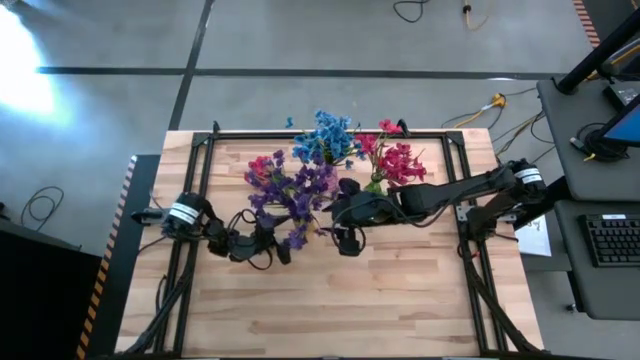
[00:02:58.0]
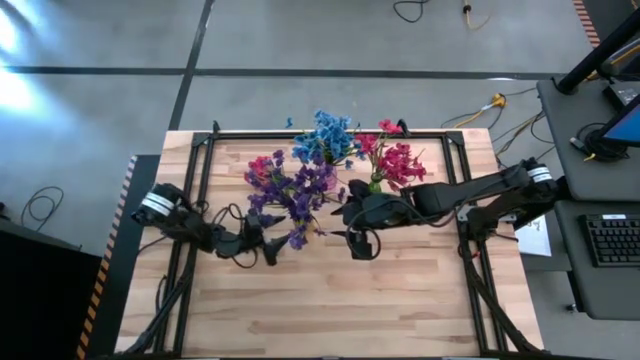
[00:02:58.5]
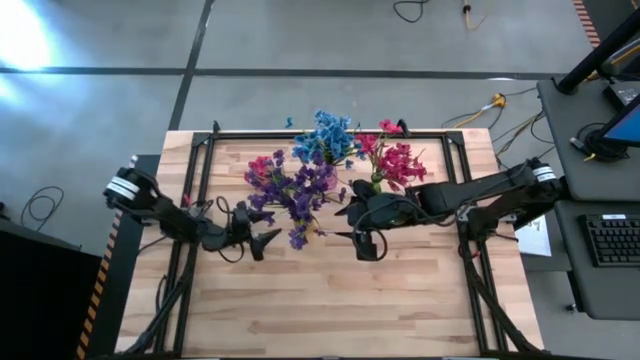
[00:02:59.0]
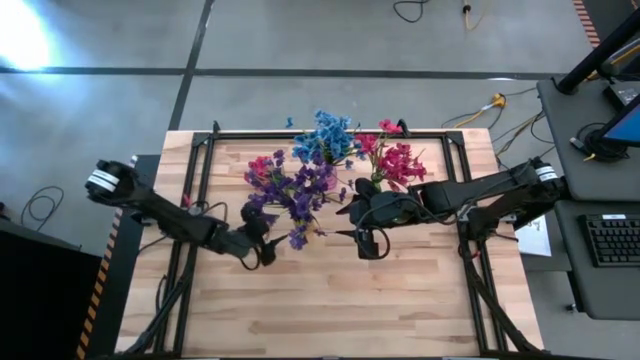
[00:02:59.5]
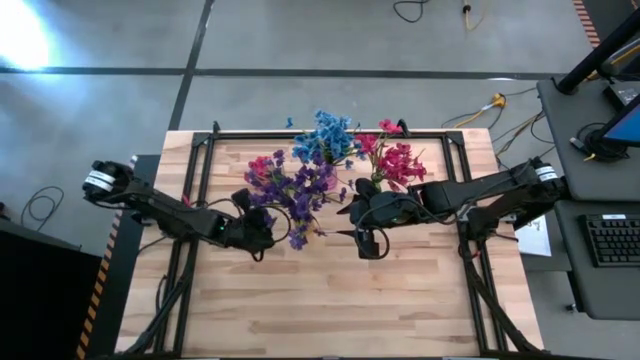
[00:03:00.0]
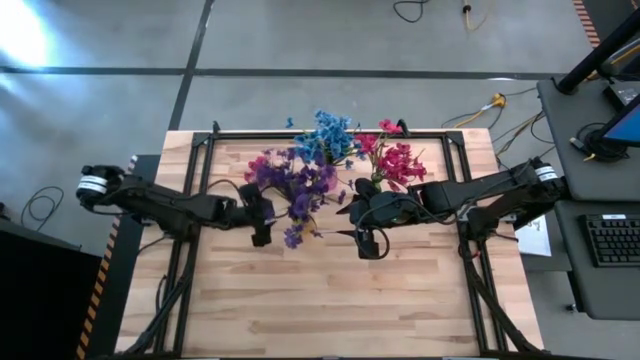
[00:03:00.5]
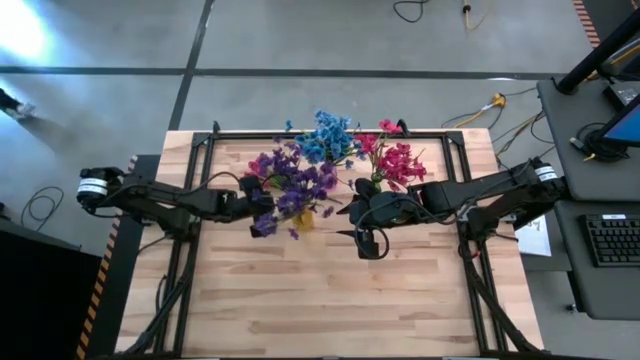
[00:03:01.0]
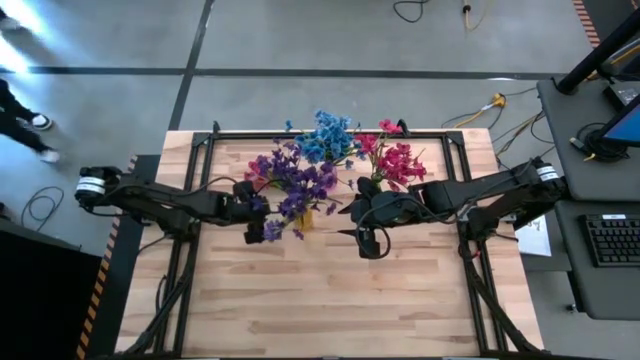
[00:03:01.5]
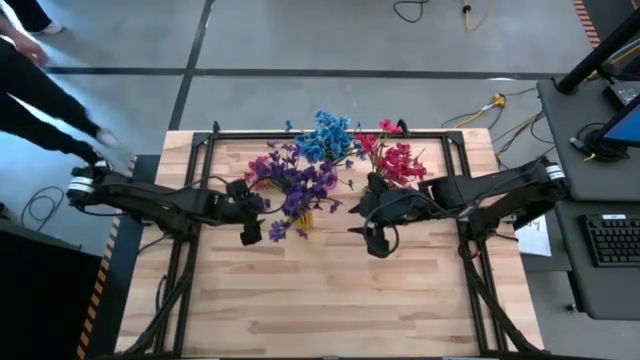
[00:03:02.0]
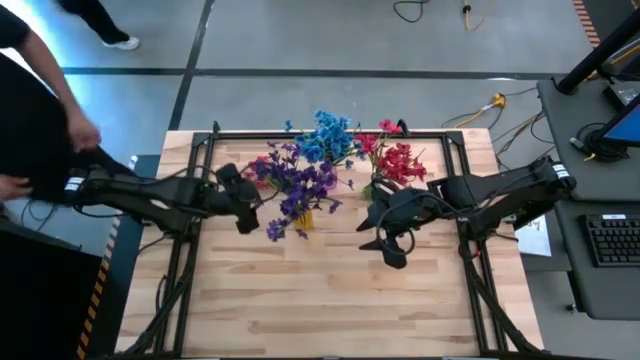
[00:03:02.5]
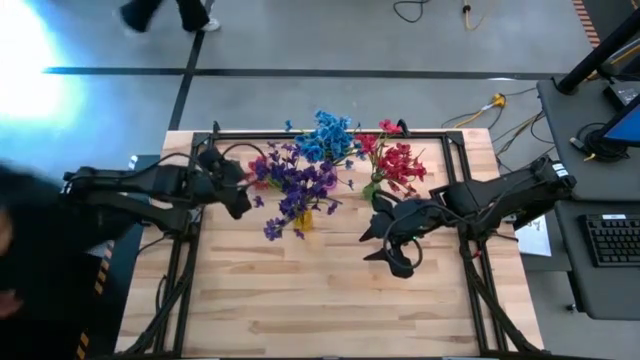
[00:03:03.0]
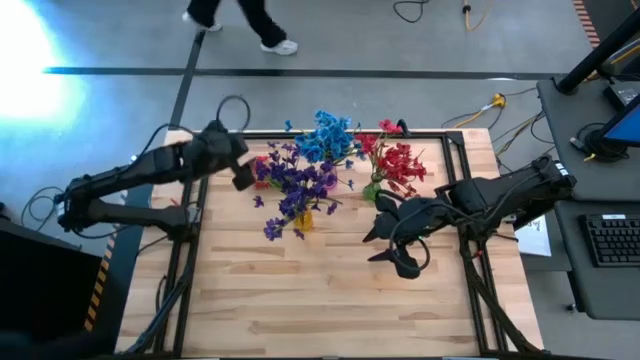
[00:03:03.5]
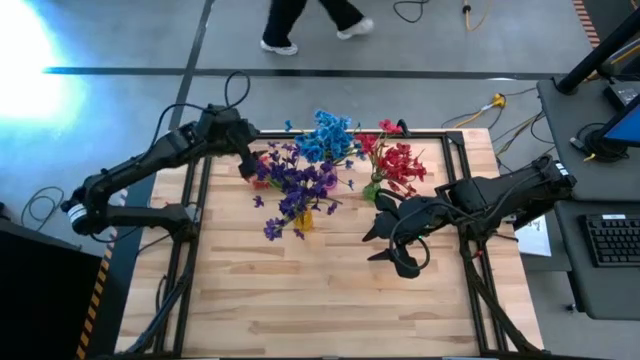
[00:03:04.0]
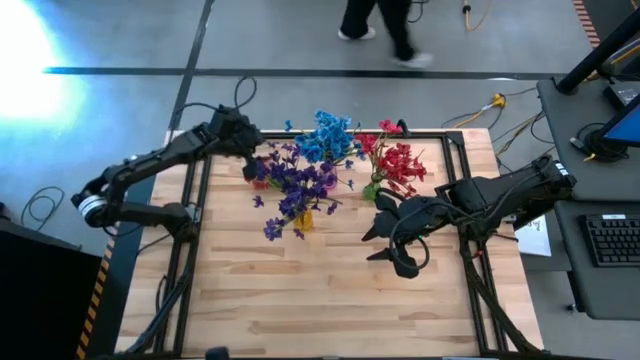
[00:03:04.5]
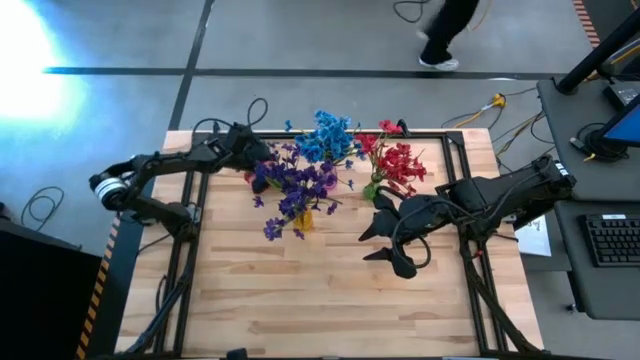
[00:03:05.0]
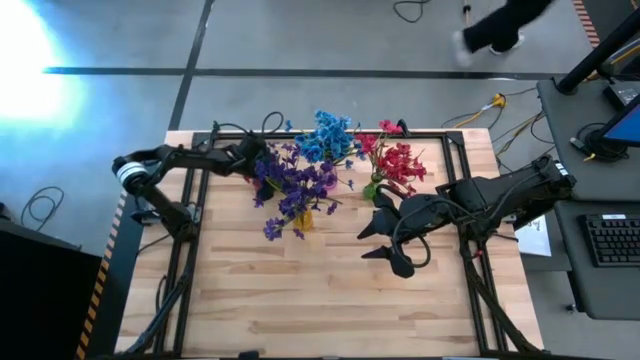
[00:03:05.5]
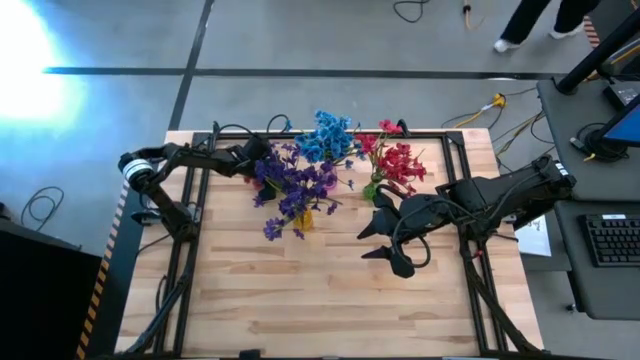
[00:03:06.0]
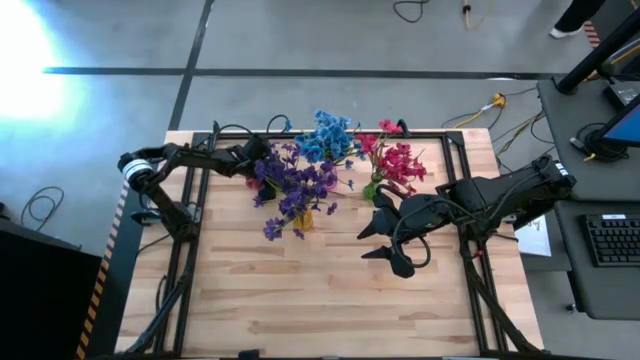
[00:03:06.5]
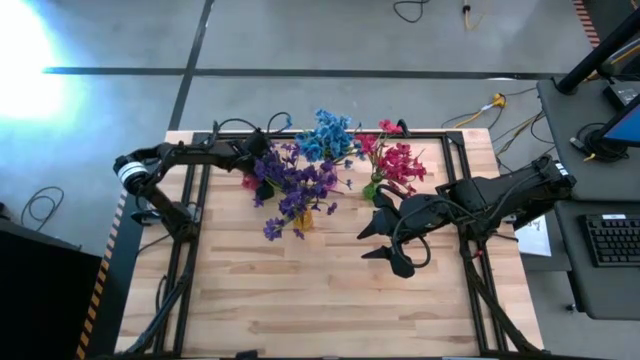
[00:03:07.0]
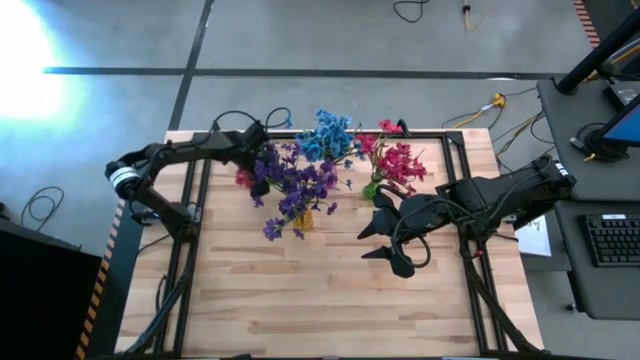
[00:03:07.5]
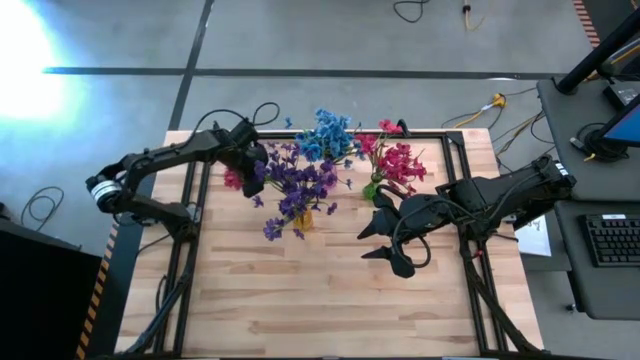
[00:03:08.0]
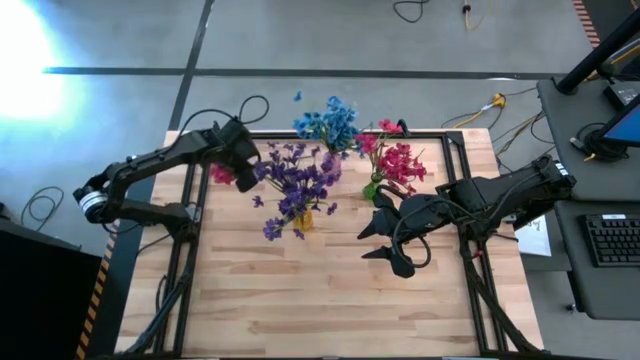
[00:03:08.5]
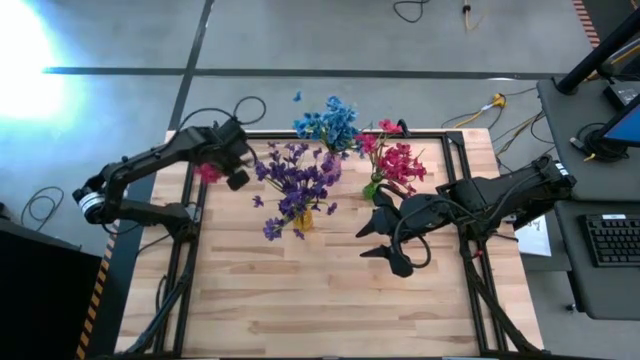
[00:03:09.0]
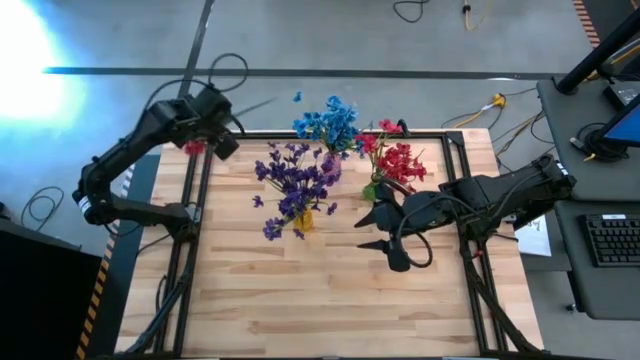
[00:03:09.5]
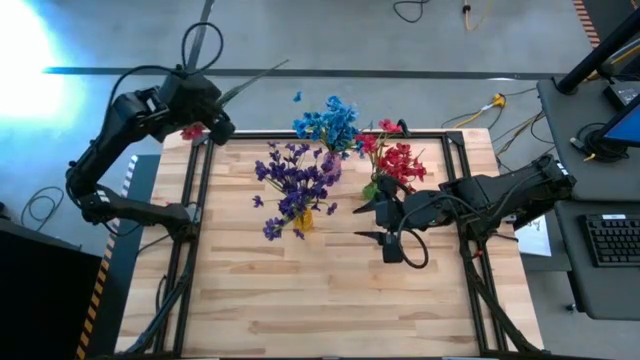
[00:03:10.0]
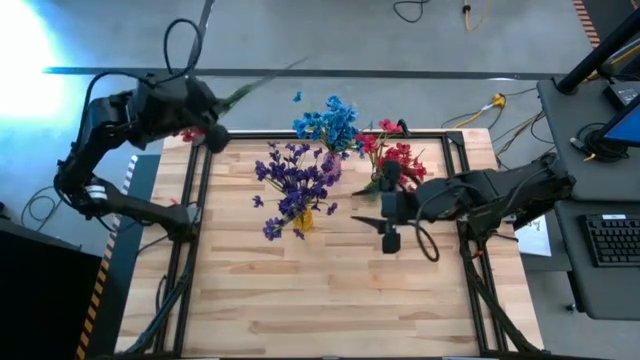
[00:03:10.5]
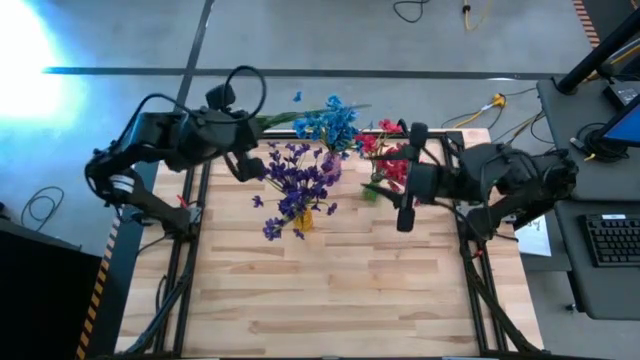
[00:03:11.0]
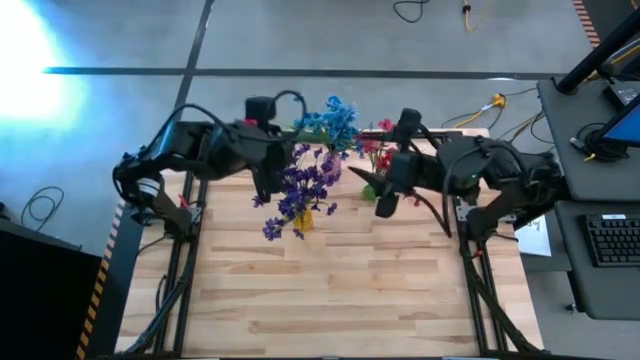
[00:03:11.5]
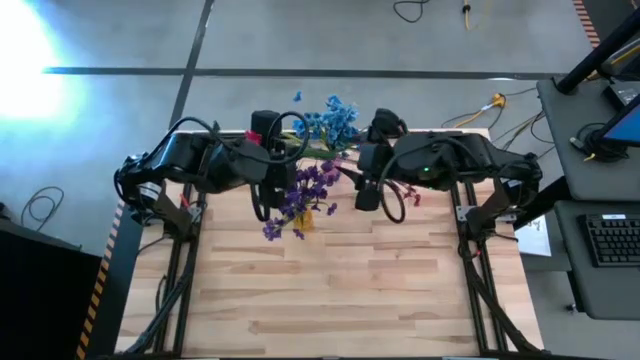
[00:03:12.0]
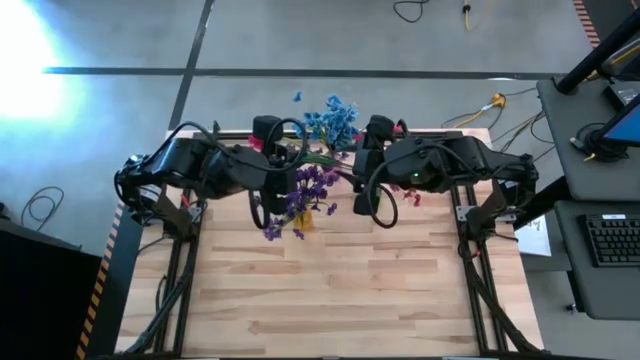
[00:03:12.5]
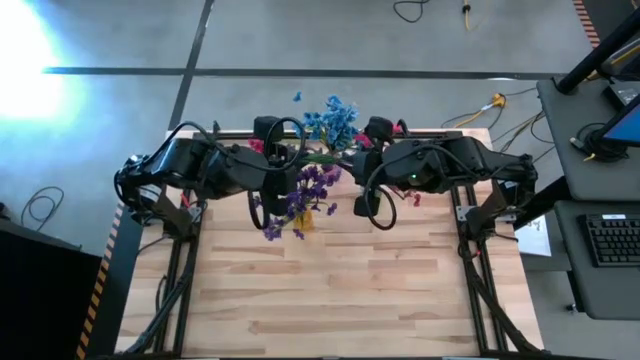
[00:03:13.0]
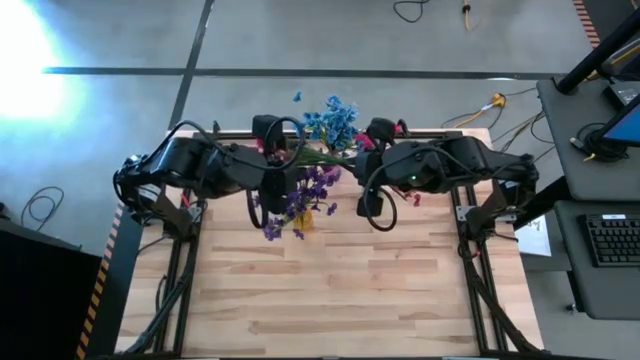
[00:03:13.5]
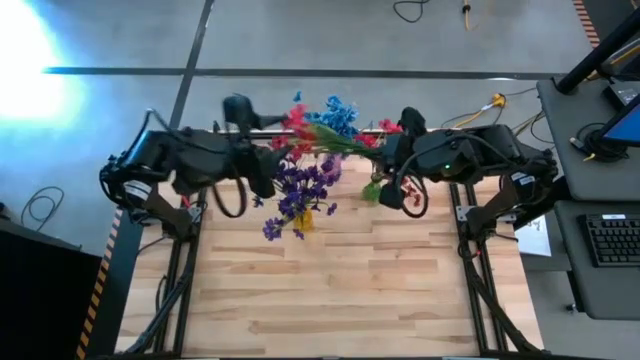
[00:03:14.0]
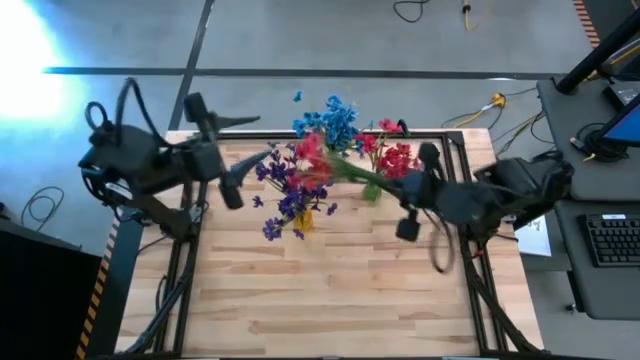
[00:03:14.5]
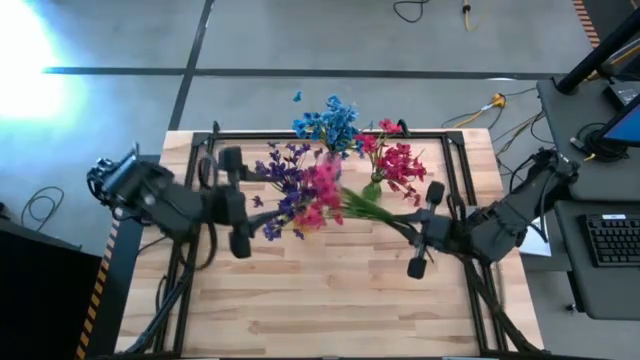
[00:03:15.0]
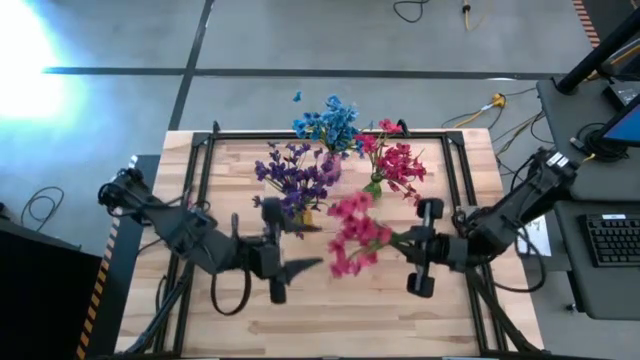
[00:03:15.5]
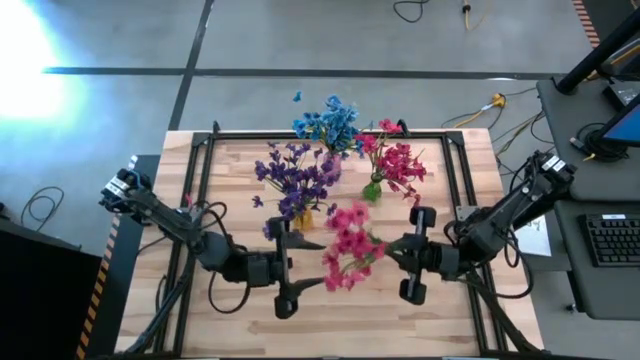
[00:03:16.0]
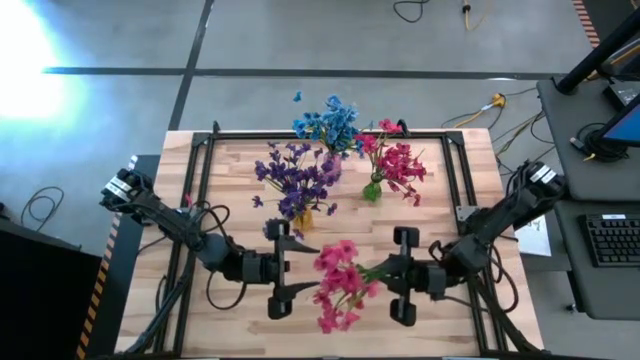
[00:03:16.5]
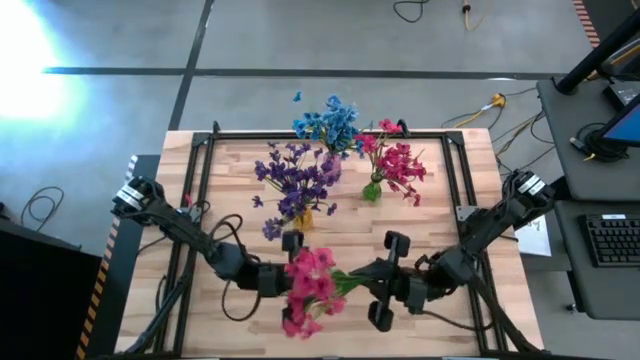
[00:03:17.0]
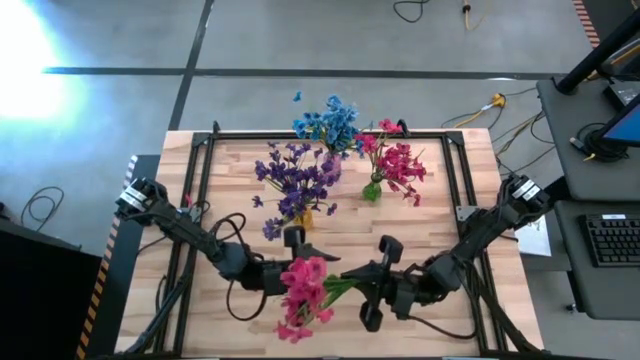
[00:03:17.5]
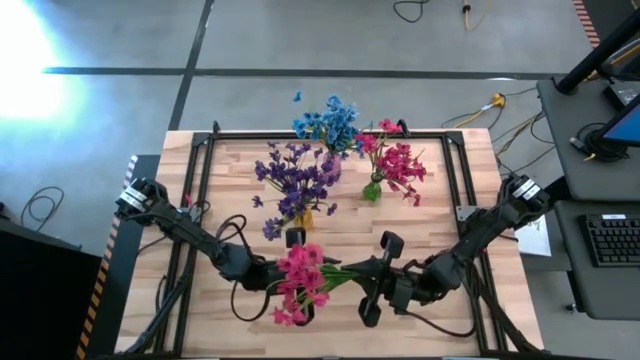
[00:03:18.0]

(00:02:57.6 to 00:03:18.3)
Task: Sort flowers into vase by color
Put the pink flowers into the green vase
